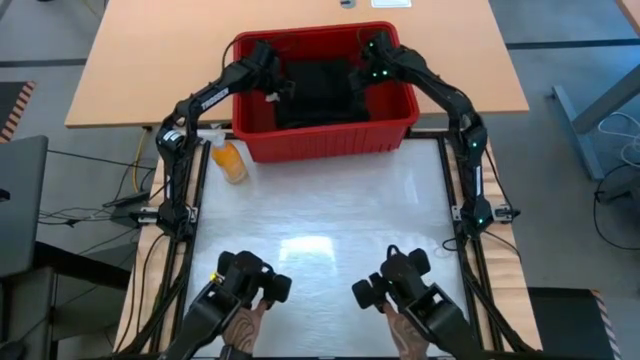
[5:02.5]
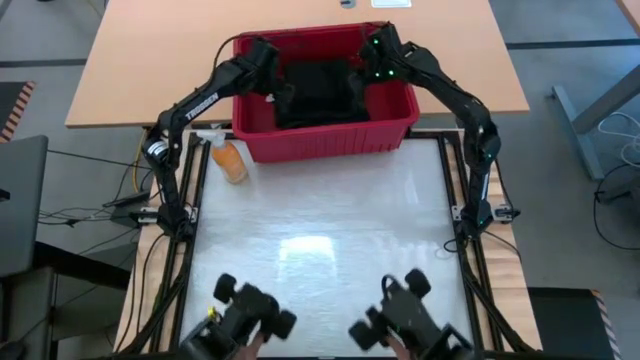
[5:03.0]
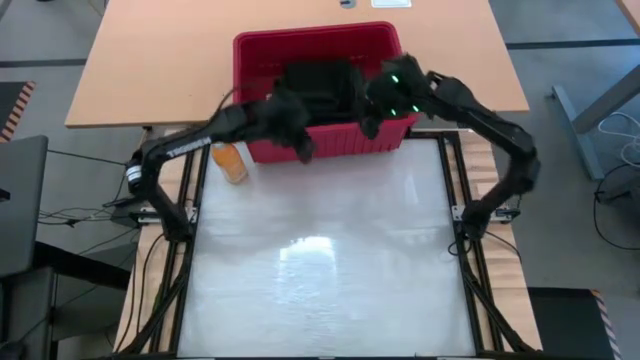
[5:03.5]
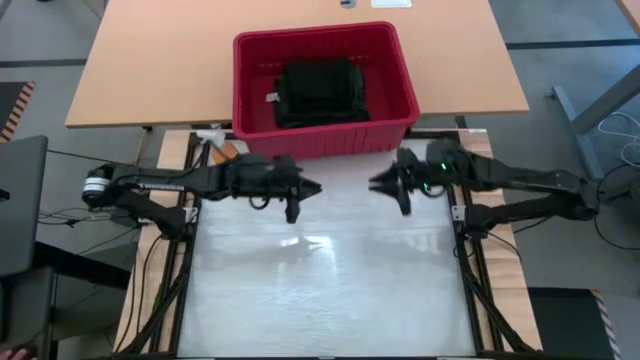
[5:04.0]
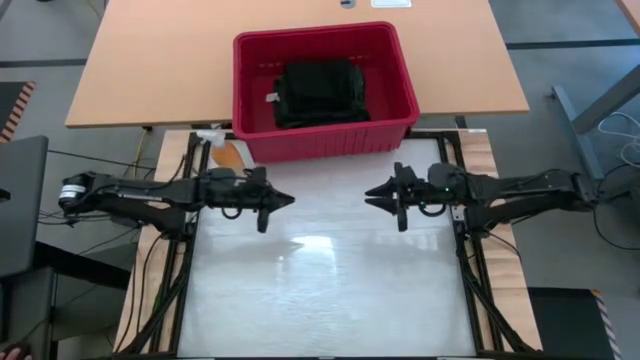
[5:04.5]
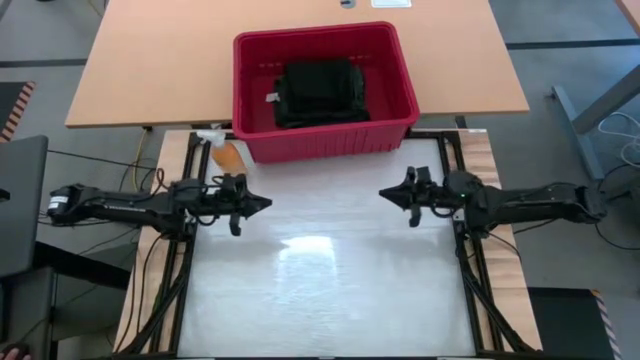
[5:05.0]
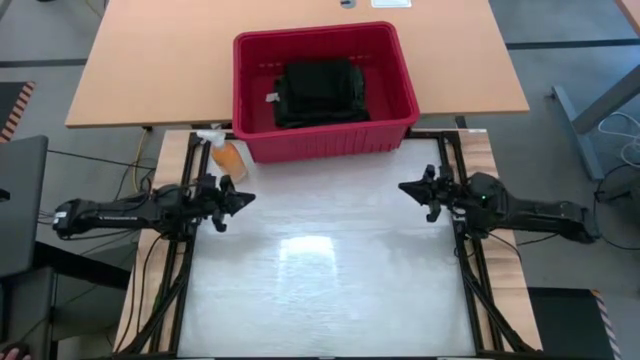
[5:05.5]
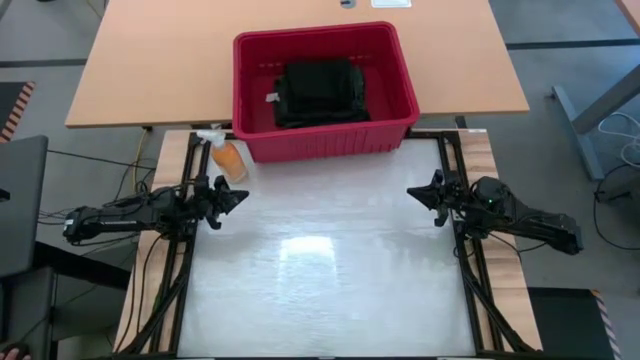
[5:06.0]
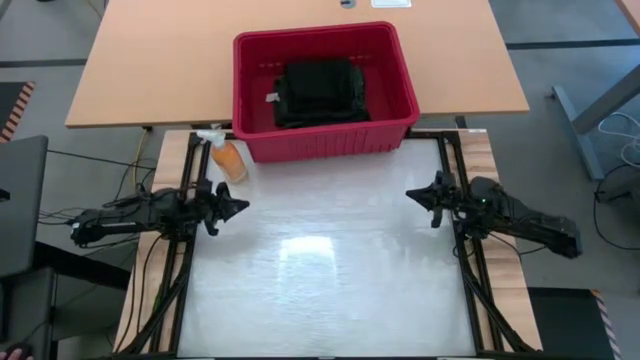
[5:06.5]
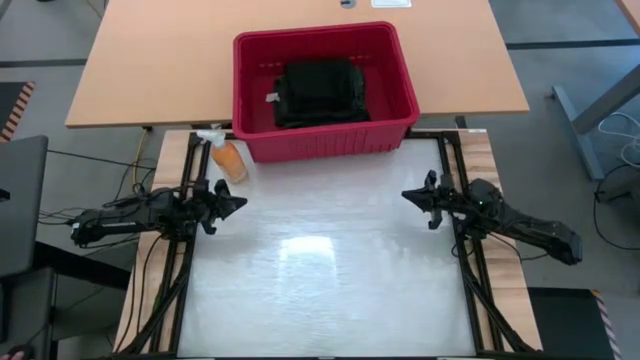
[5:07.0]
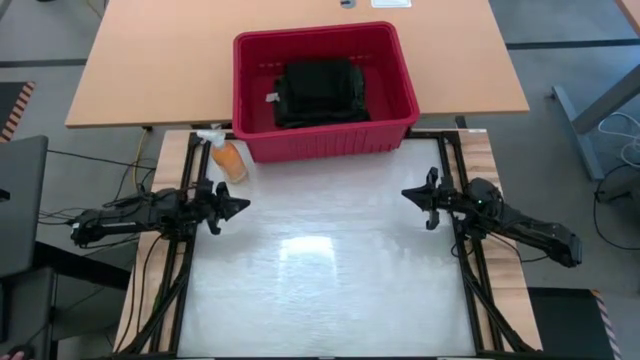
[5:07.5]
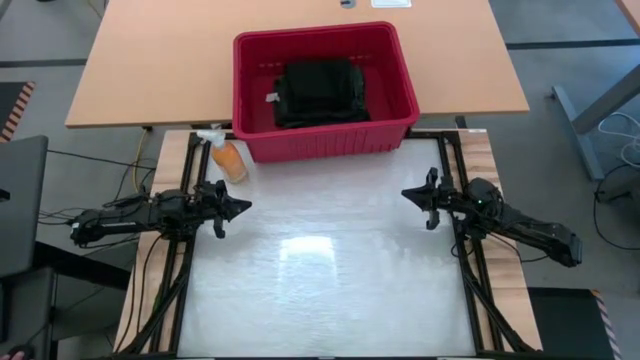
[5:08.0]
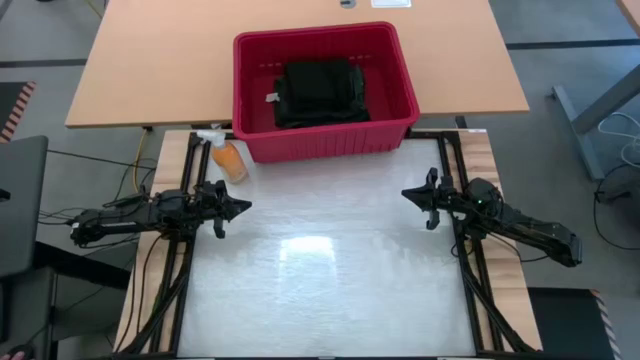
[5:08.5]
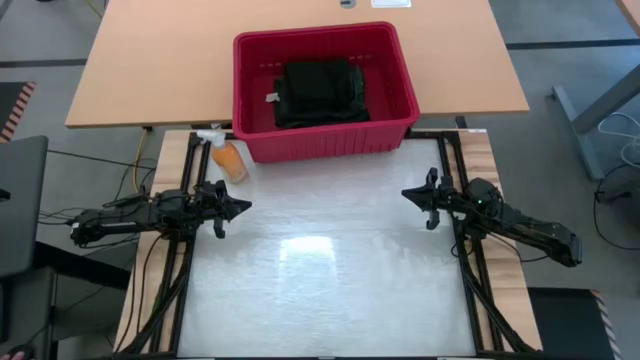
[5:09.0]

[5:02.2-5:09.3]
Task: Fold Laundry from Bin
Return to Home Position

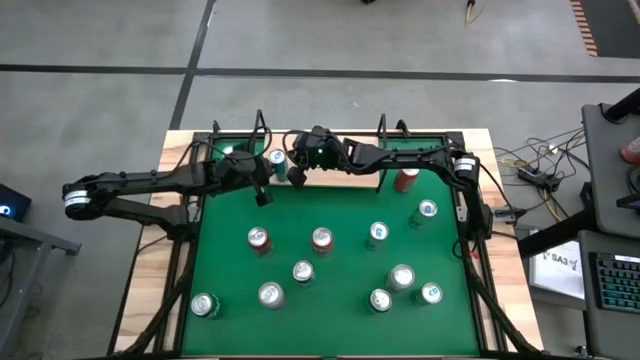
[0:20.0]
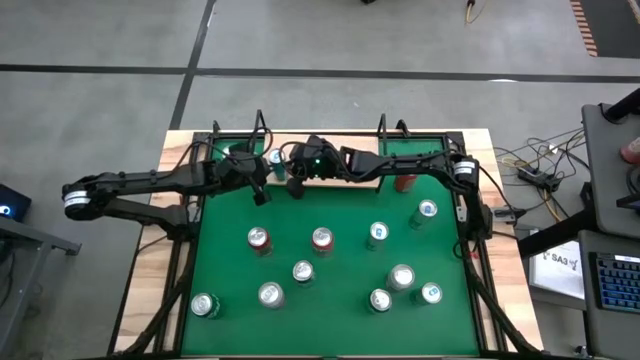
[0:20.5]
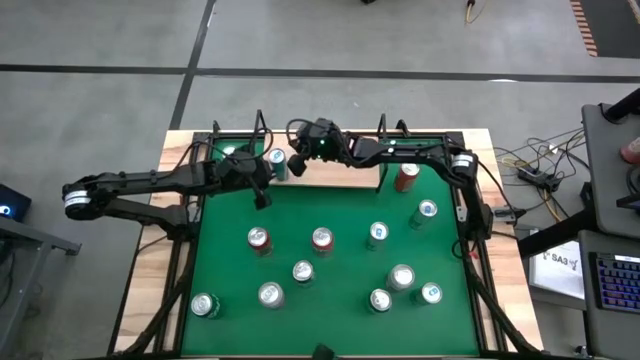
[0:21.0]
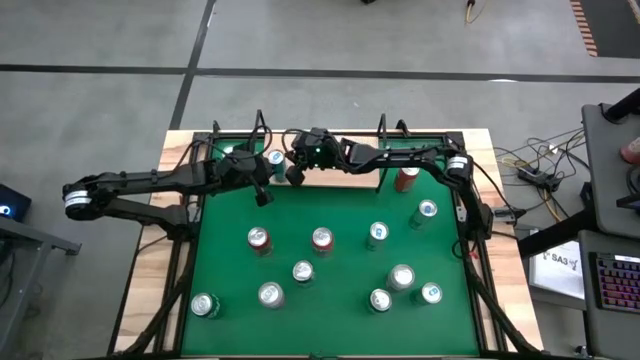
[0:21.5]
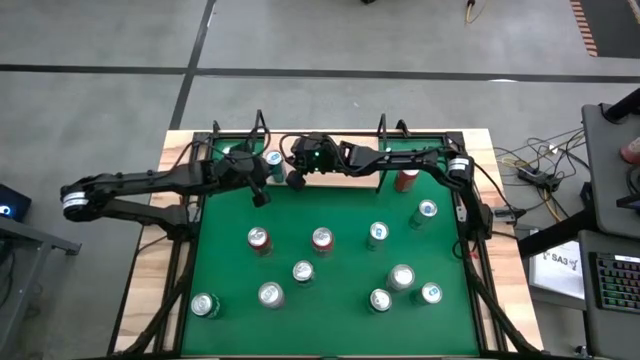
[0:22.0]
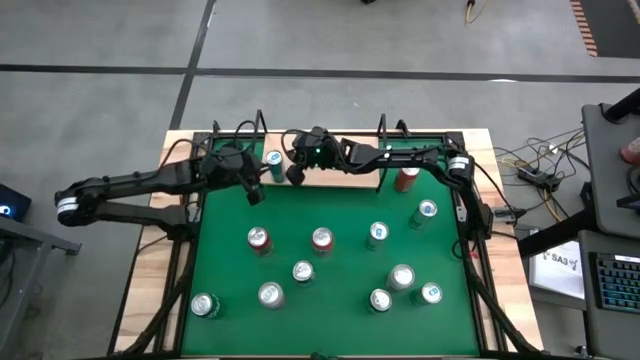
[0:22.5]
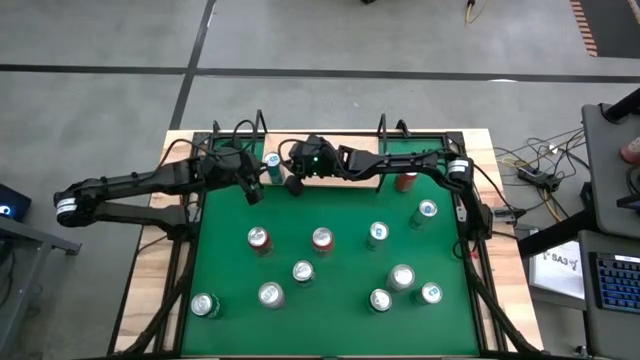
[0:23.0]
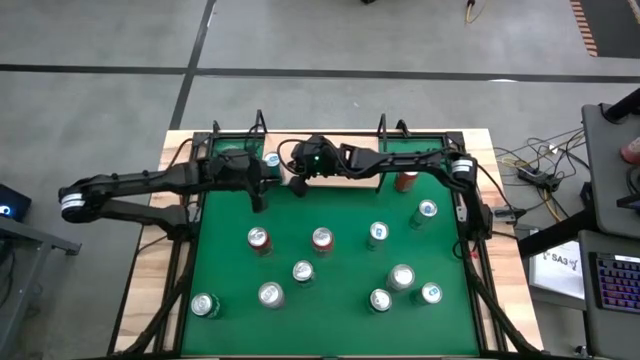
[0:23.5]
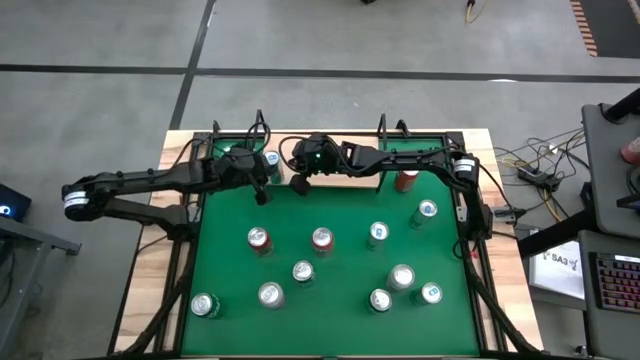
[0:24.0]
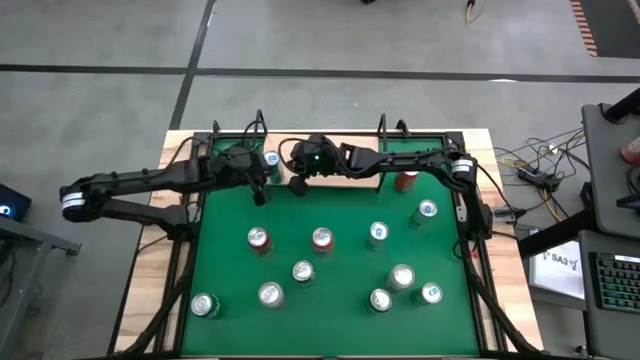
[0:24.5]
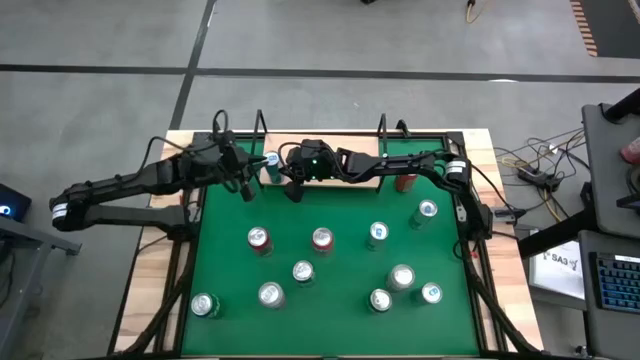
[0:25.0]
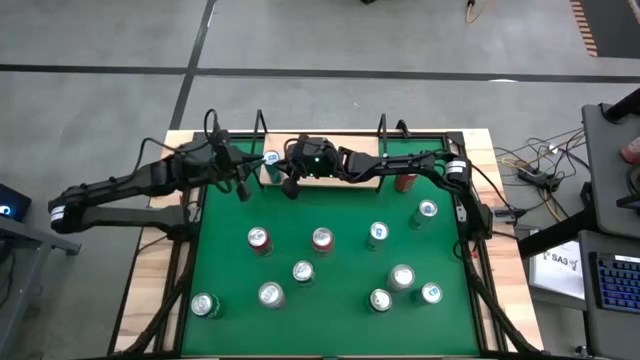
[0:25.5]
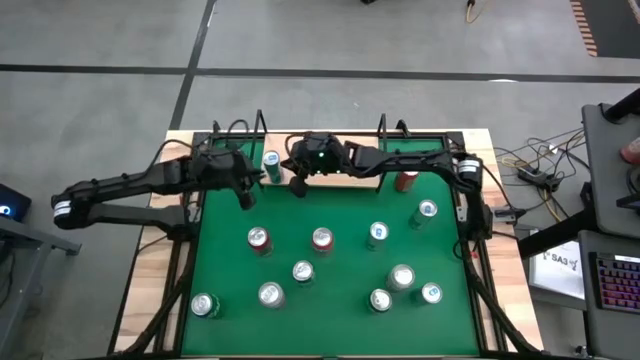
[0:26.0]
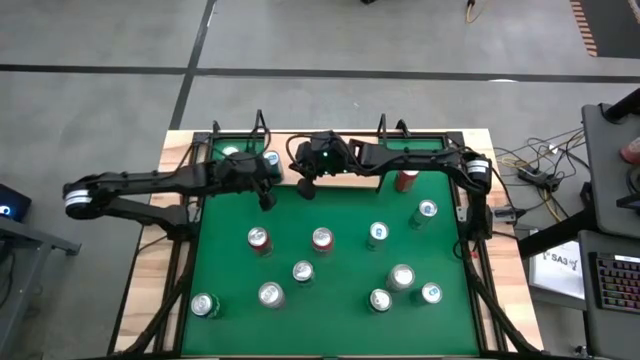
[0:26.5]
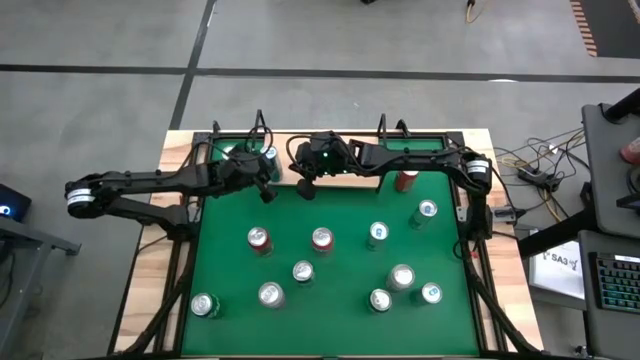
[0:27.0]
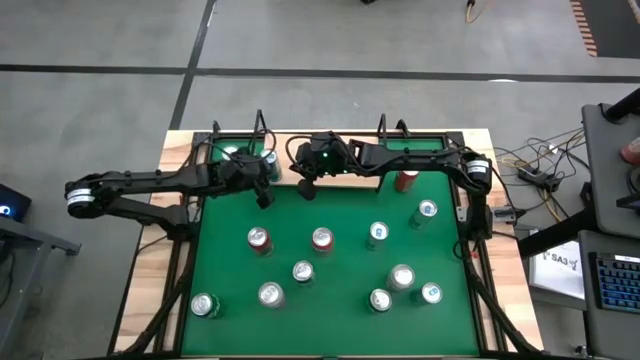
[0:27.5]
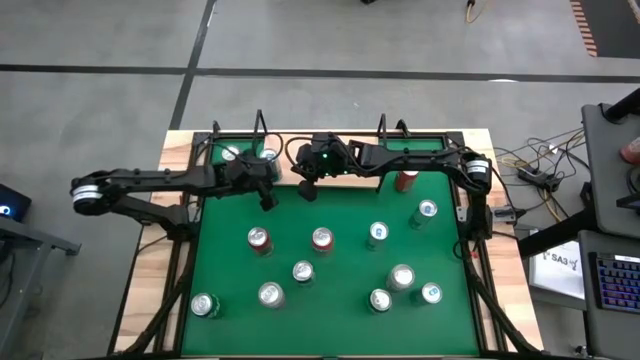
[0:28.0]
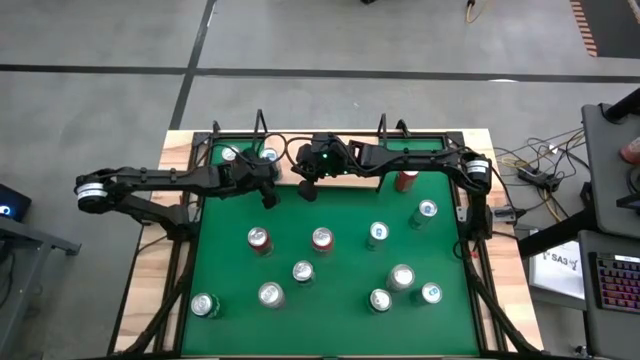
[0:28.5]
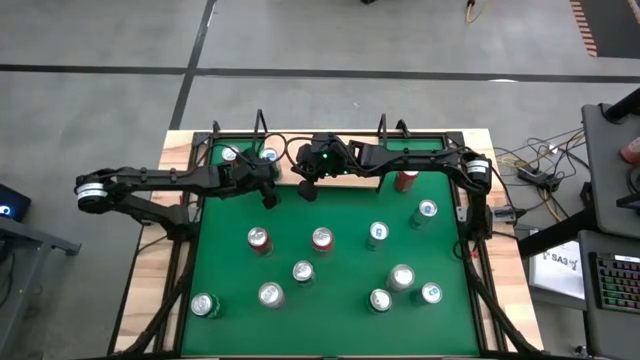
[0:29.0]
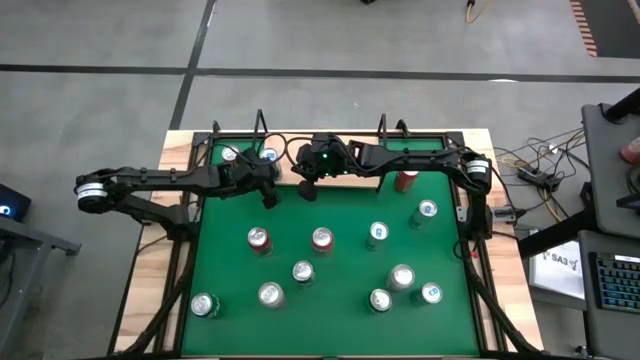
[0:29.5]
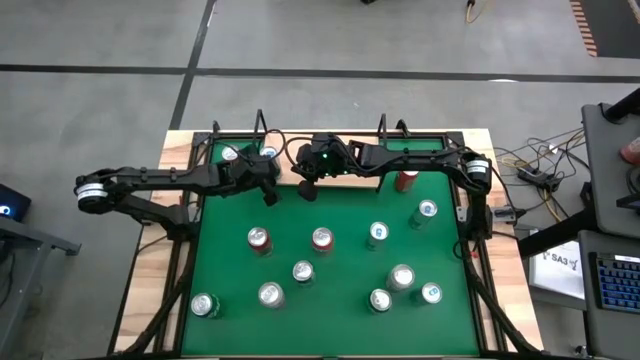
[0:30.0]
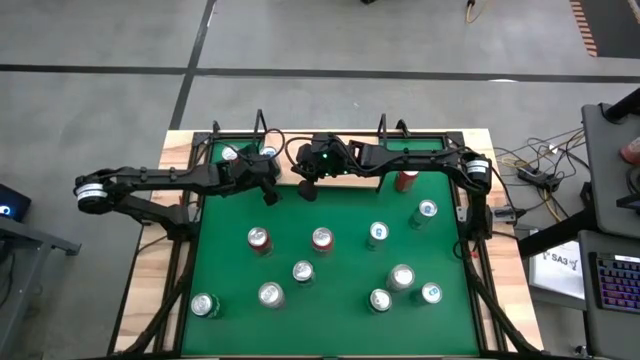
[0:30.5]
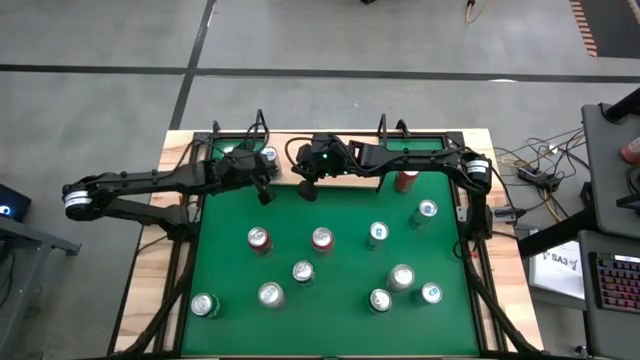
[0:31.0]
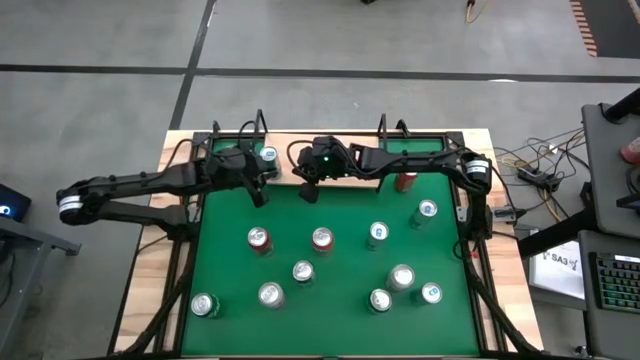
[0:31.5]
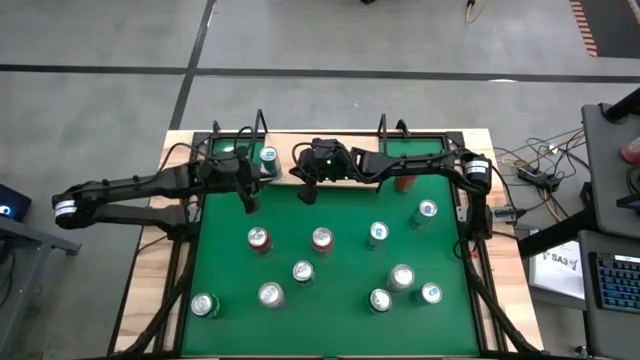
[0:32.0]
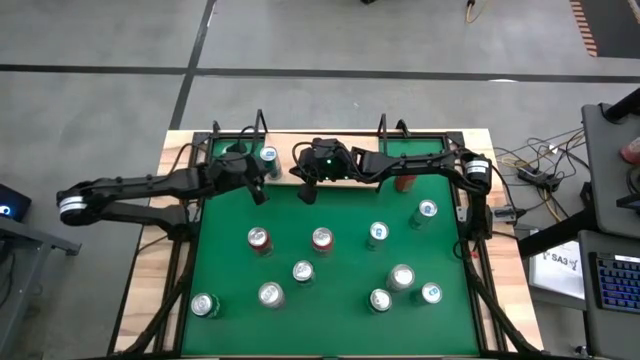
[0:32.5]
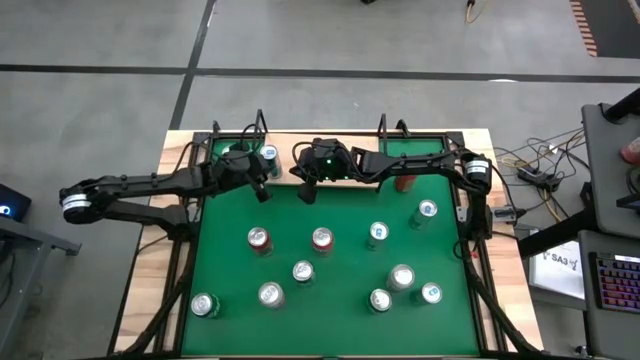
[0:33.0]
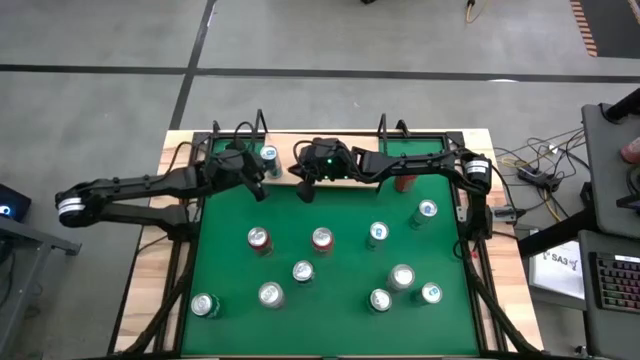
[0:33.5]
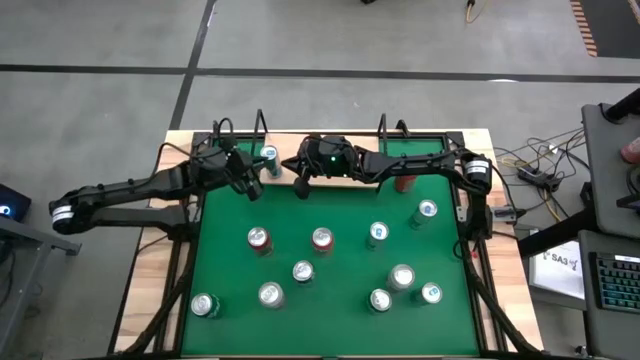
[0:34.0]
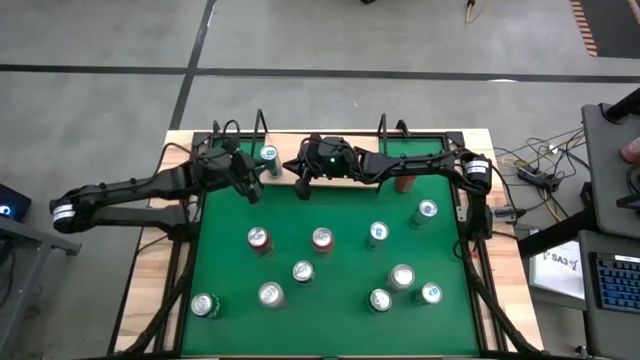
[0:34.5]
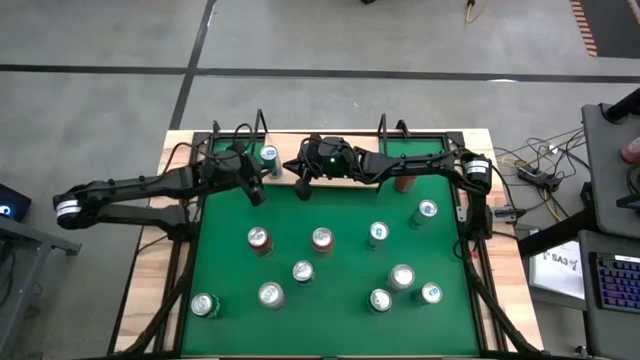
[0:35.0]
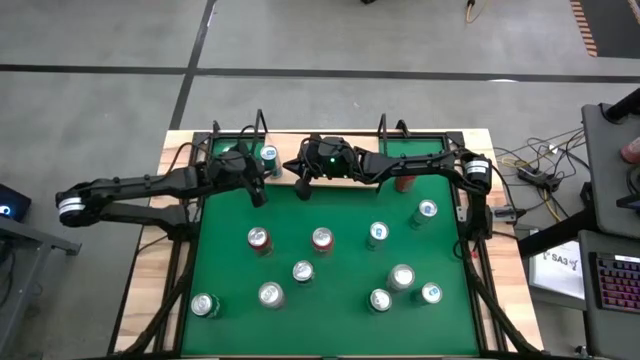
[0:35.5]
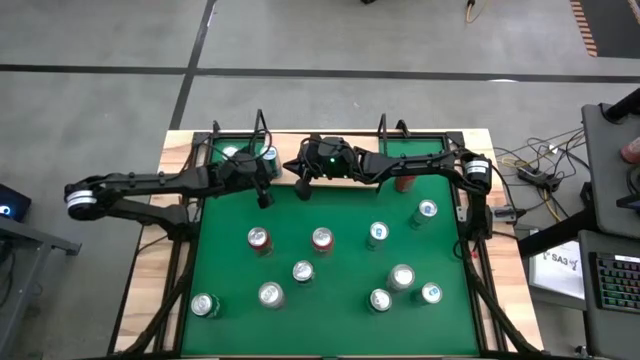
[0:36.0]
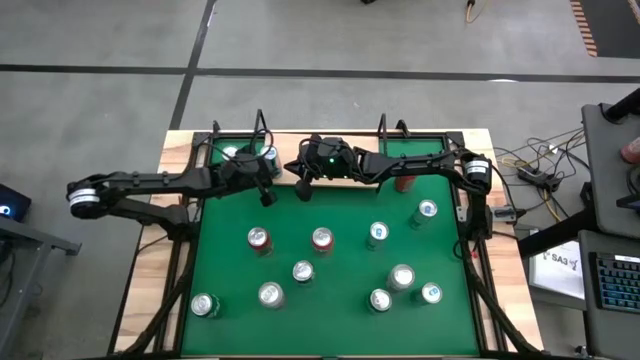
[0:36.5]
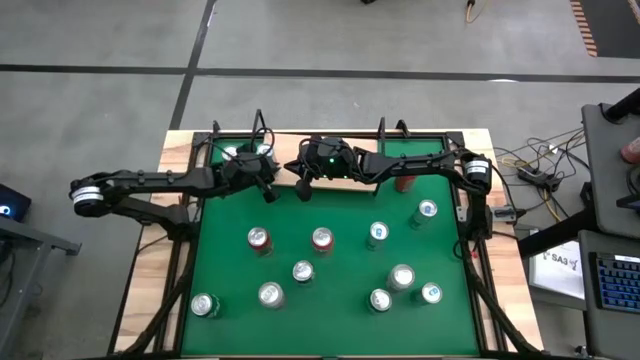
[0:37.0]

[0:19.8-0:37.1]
Task: Pick and place cans onto a shelf
Put the top left blue silver soda can on the shelf
